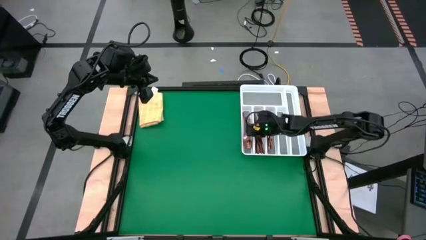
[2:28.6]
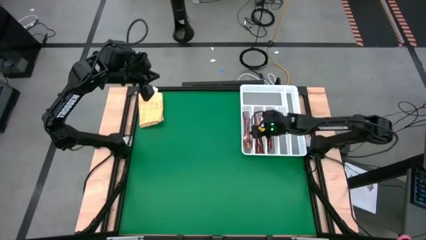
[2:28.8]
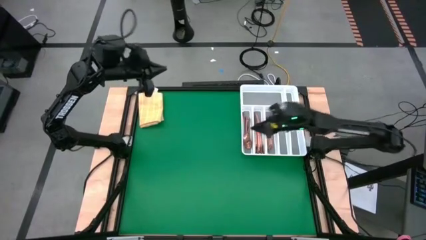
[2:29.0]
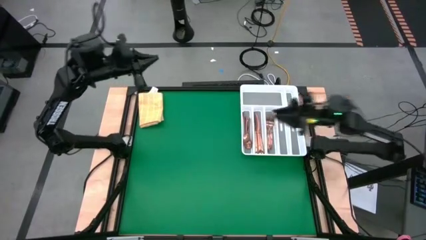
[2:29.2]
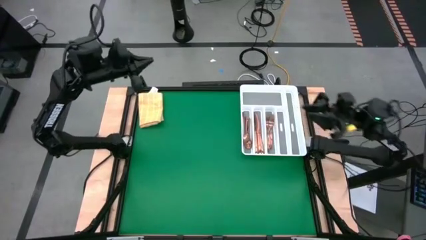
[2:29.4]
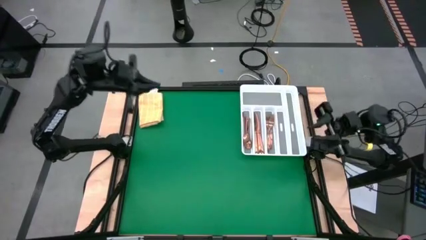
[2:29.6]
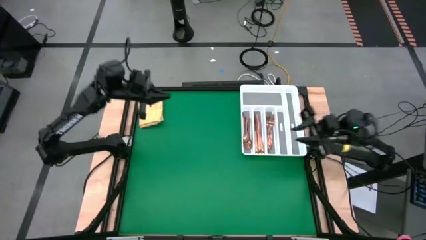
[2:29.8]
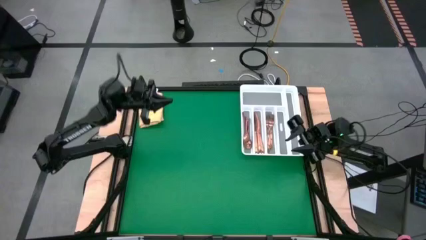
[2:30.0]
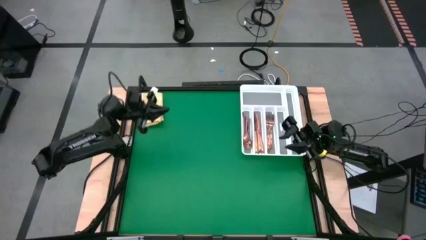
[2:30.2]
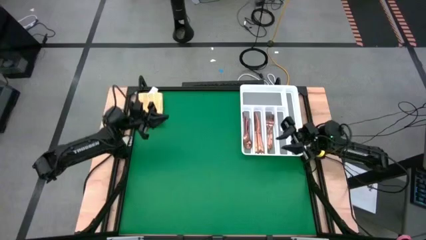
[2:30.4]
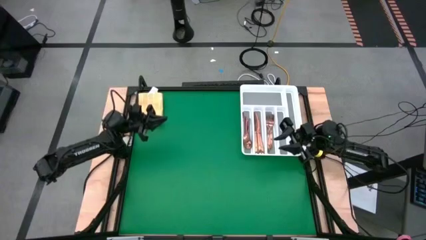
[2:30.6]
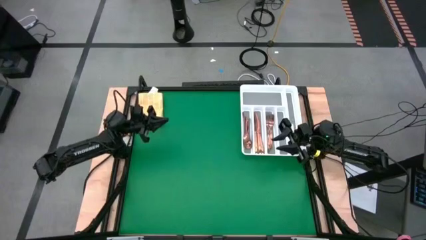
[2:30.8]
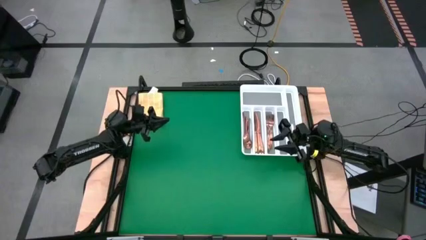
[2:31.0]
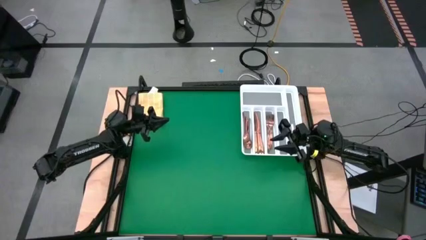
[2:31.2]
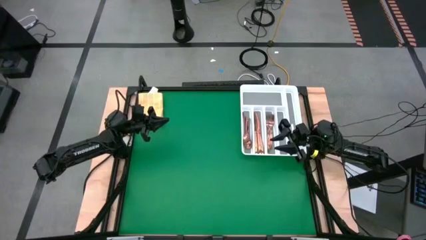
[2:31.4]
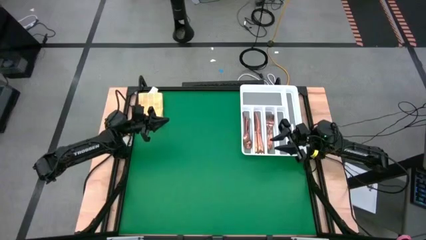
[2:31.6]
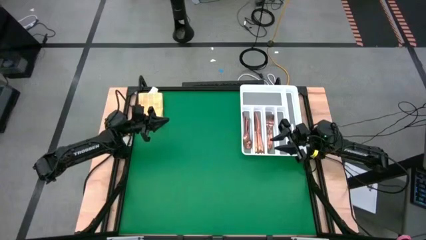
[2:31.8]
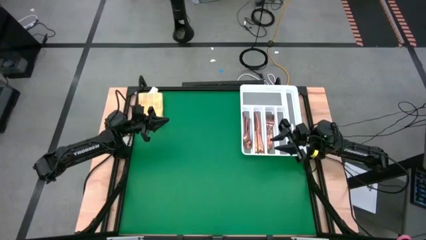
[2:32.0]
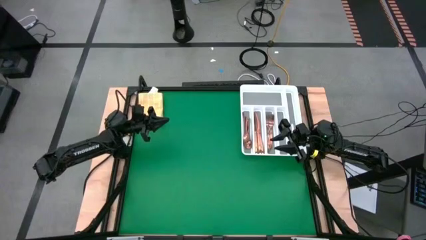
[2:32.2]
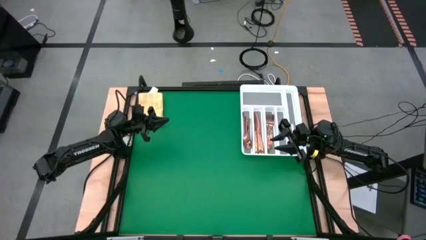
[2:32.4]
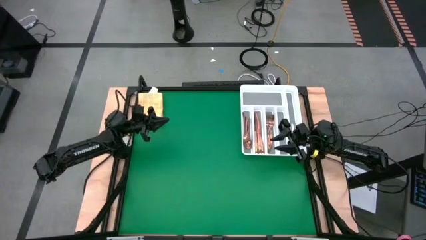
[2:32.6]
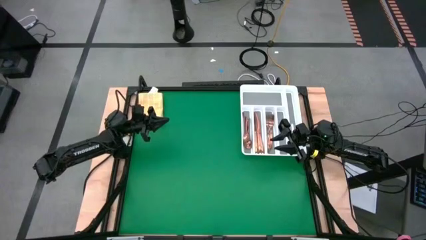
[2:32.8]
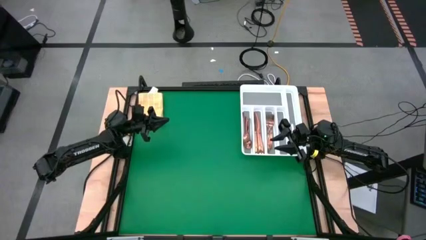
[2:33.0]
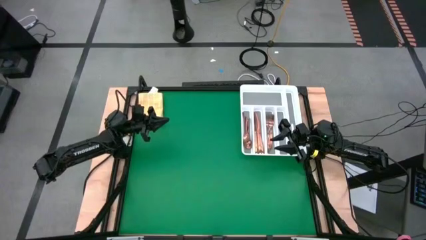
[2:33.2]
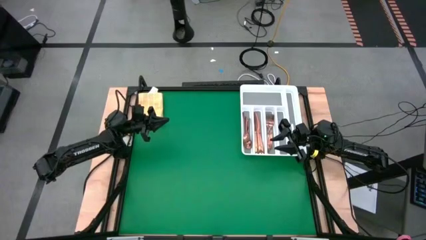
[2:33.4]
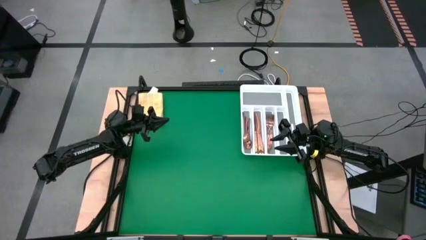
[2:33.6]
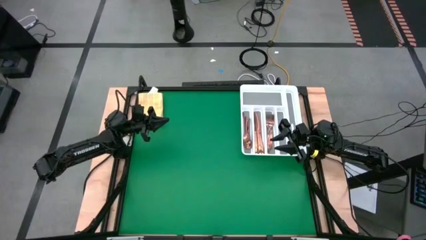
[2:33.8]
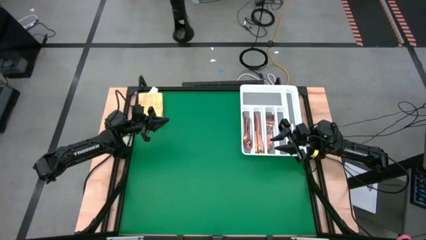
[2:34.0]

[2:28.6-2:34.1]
Task: Sort silverware
Return to Home Position

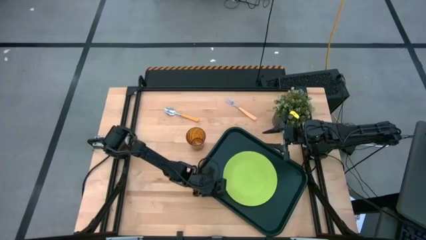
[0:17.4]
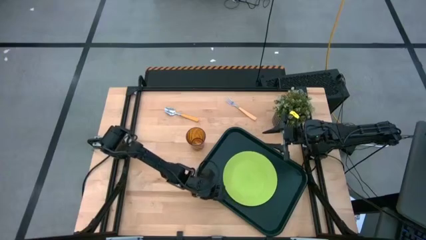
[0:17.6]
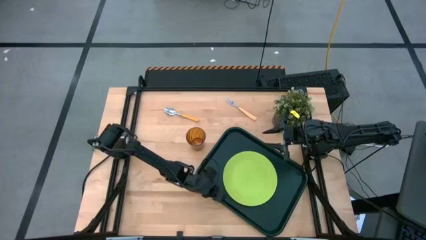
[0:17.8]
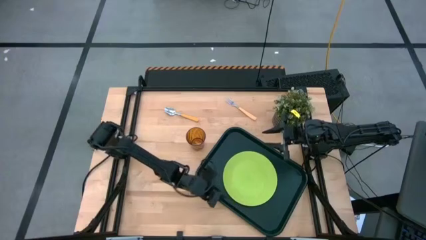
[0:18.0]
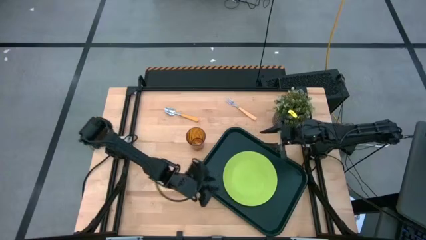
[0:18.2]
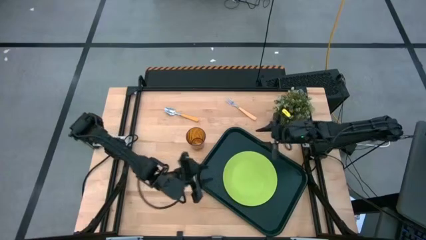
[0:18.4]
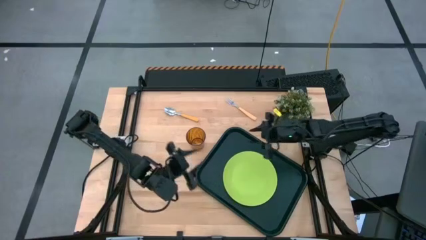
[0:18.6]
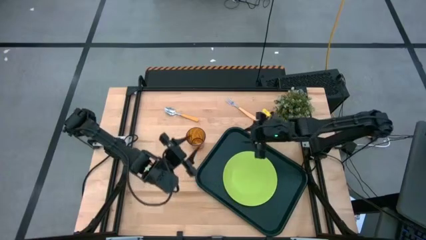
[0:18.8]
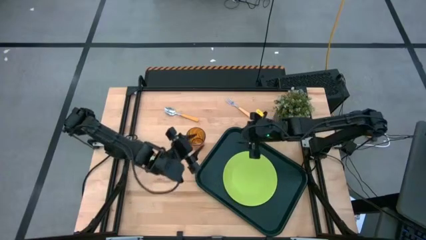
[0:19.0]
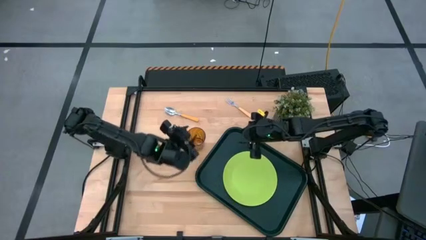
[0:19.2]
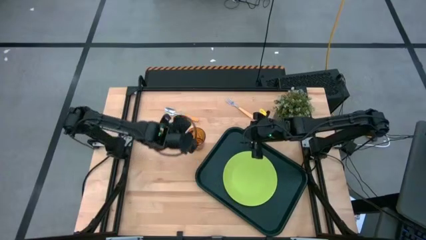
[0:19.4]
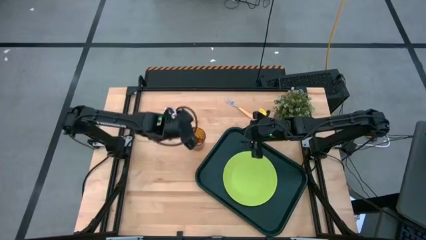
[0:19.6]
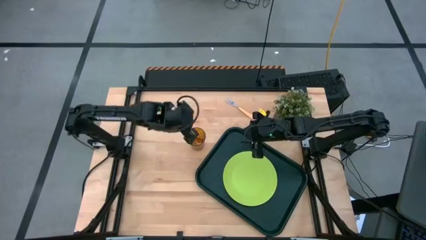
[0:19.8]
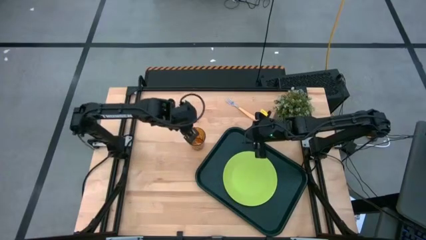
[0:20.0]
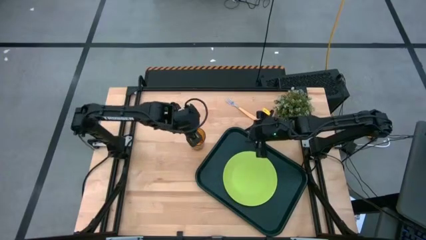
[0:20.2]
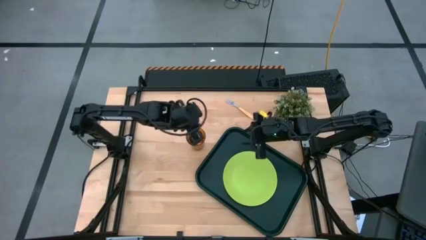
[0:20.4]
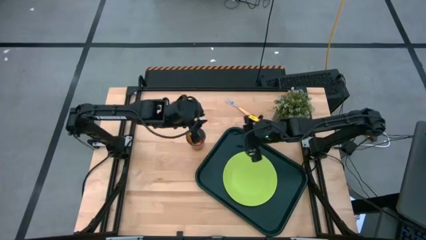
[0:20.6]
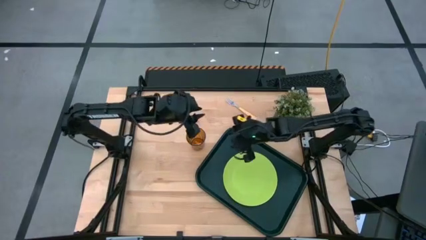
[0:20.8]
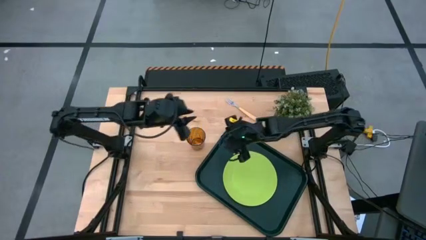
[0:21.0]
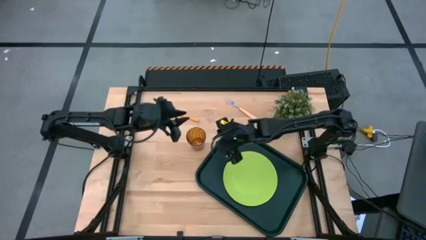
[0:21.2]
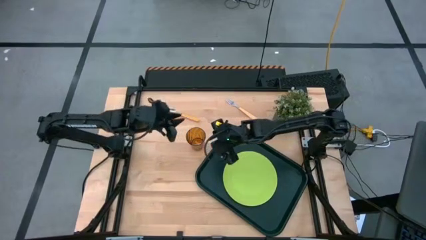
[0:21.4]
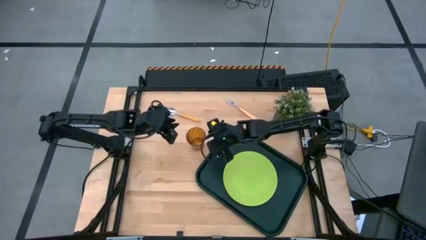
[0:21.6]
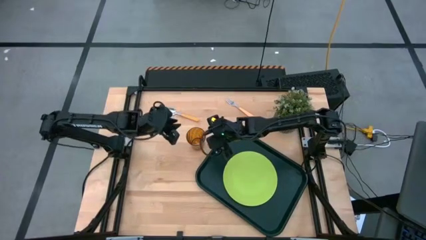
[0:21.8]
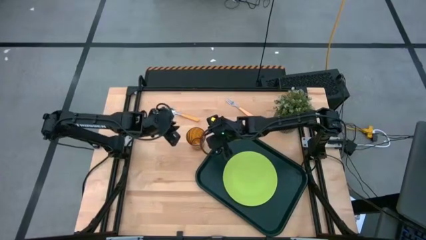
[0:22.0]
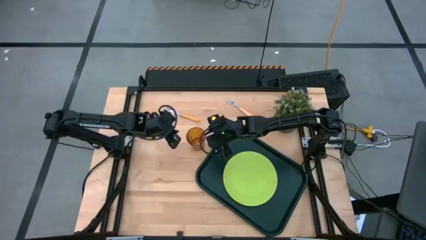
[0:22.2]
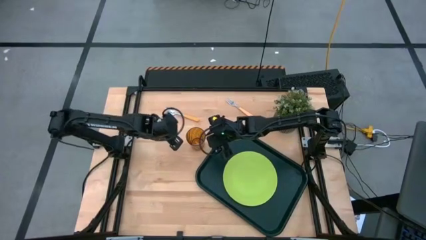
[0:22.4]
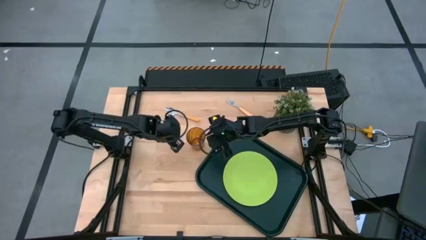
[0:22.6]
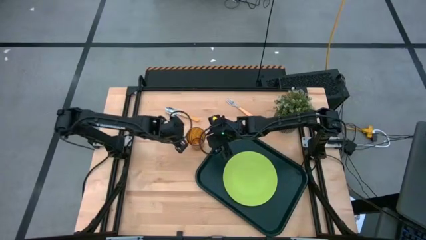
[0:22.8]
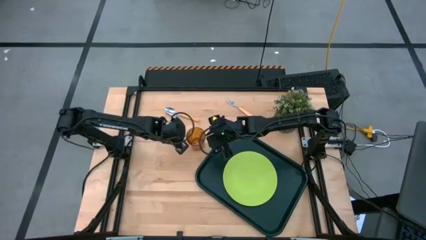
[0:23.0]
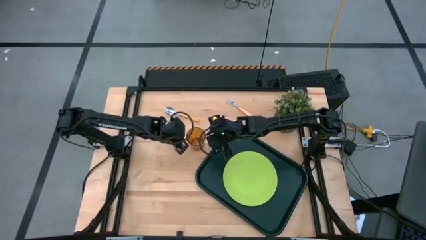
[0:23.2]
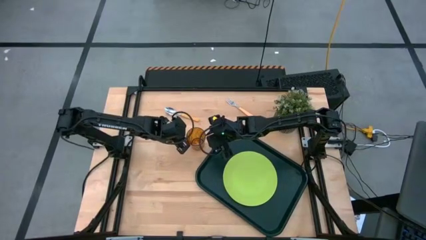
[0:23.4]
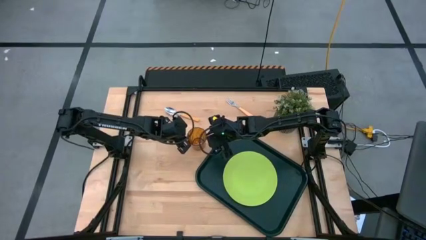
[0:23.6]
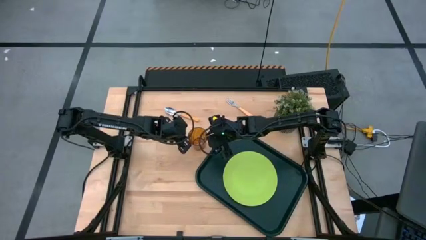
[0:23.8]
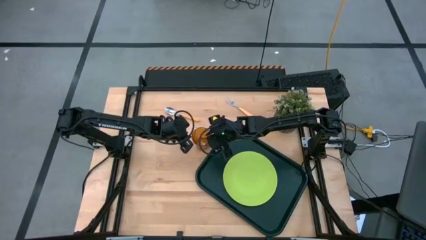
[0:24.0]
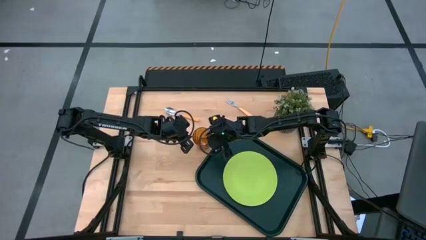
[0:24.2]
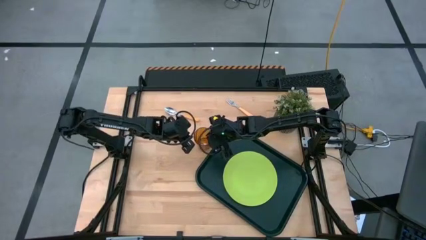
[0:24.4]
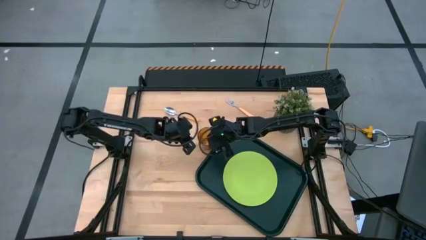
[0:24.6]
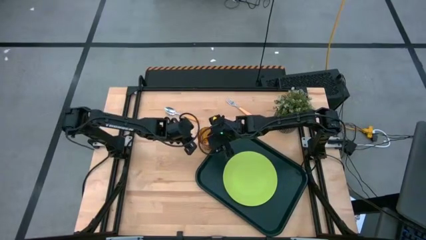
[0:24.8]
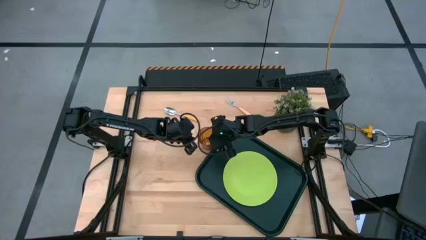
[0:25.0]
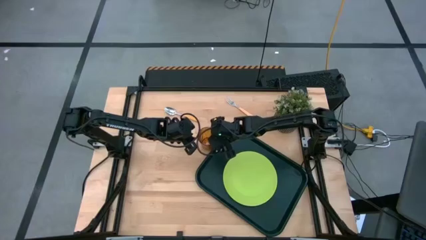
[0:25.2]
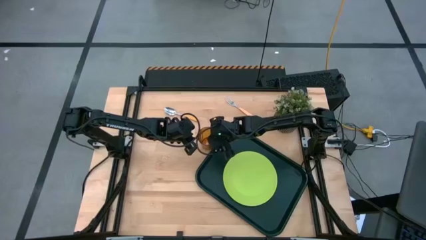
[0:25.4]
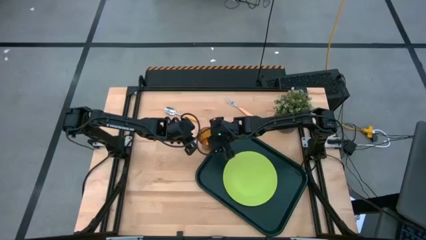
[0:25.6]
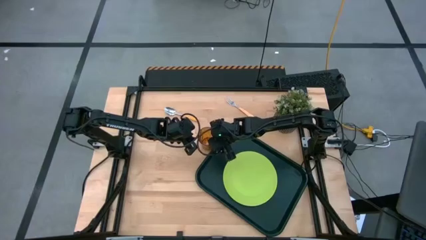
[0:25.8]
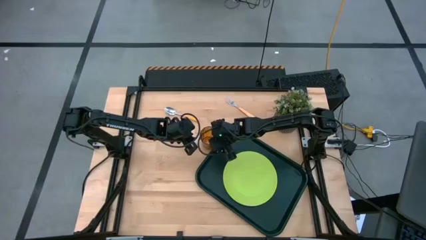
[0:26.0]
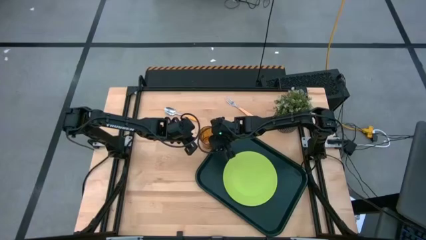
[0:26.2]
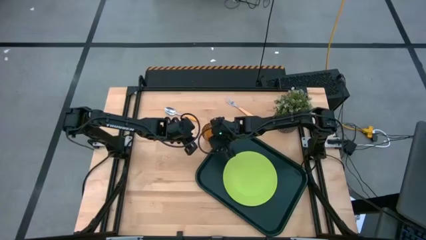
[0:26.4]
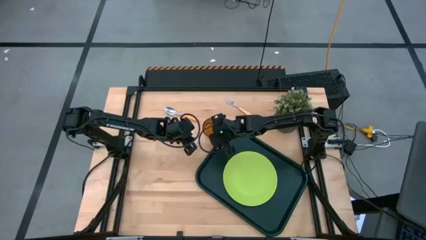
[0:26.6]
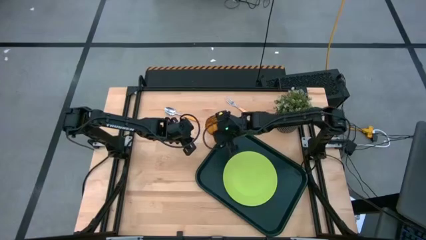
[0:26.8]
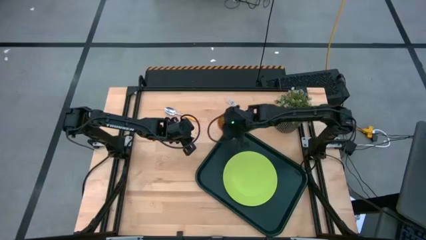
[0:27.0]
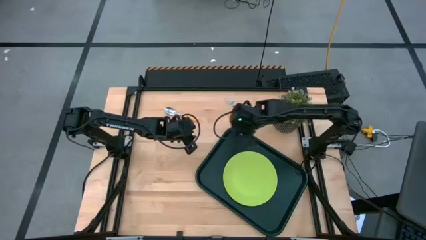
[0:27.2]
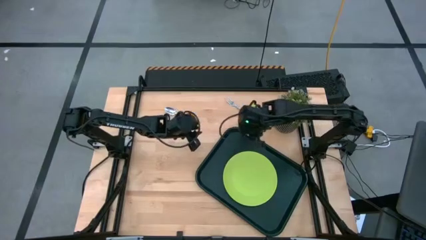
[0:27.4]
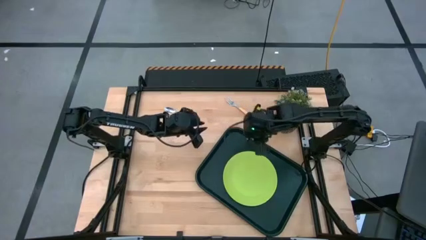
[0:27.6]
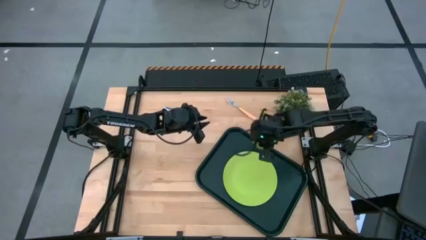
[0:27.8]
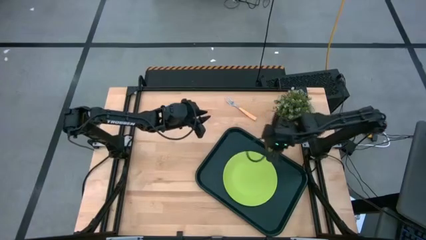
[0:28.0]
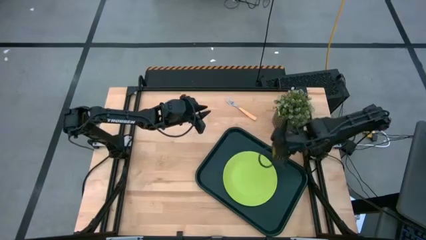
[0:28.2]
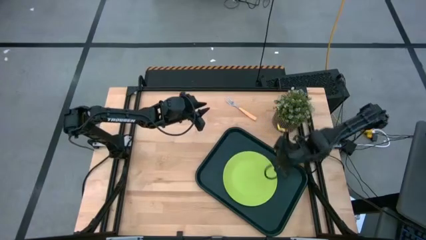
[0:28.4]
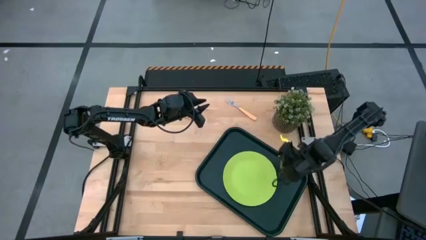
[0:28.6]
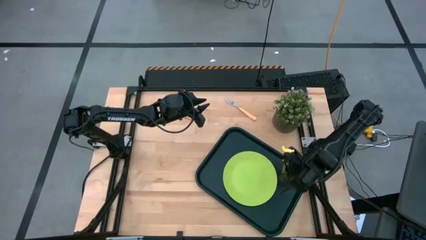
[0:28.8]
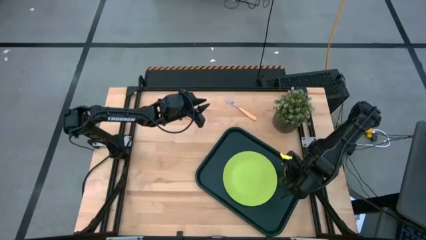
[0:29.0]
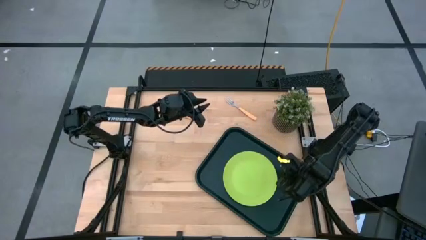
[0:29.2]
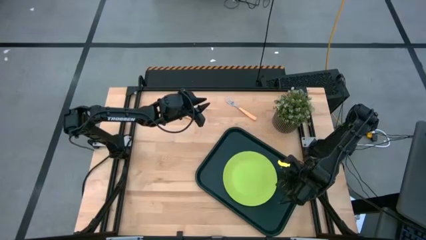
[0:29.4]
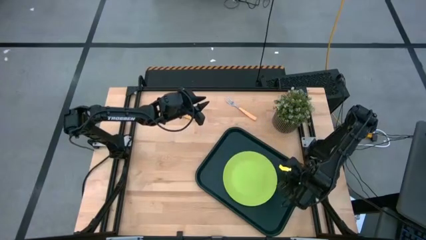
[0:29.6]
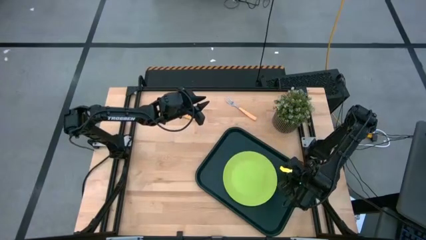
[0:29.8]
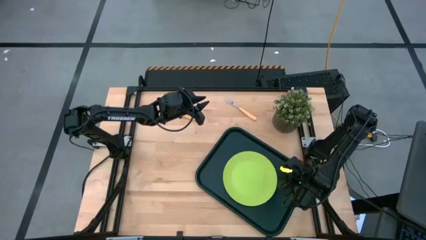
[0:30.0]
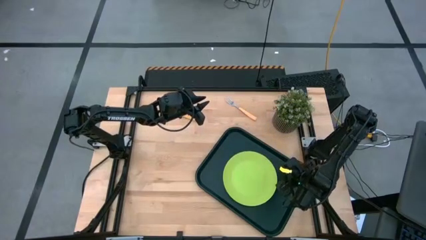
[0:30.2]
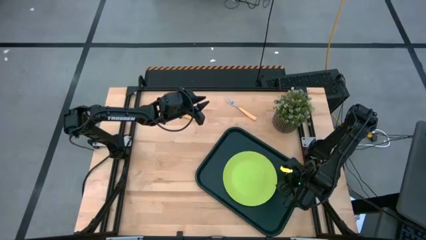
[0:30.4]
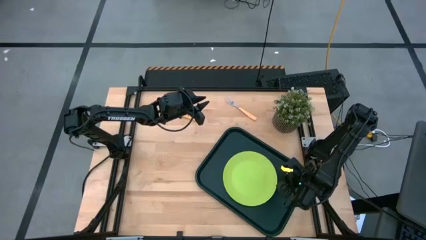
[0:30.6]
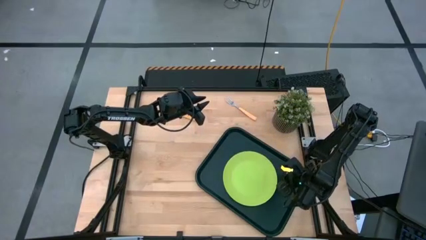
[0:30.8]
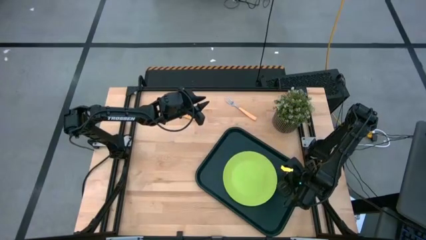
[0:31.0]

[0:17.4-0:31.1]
Task: Pick and place plate/cup/fork/spoon on tray
Put the brown cup on the black tray to the top right of the green plate
